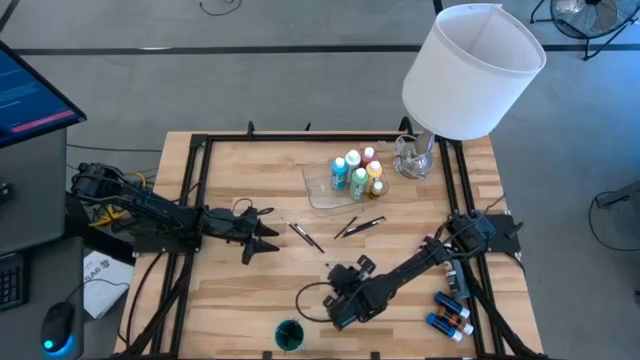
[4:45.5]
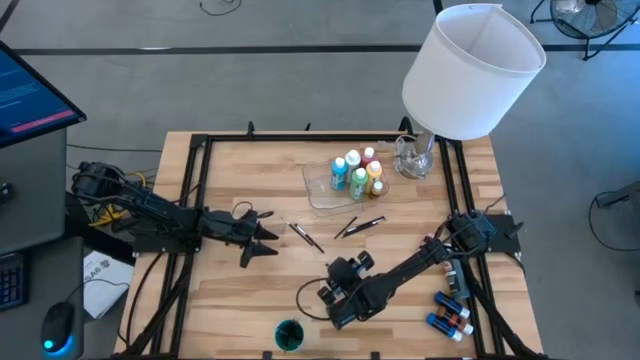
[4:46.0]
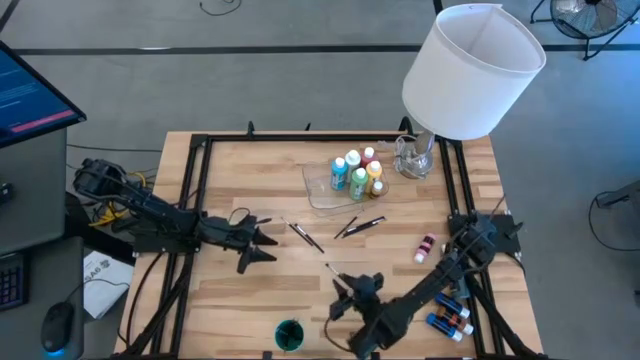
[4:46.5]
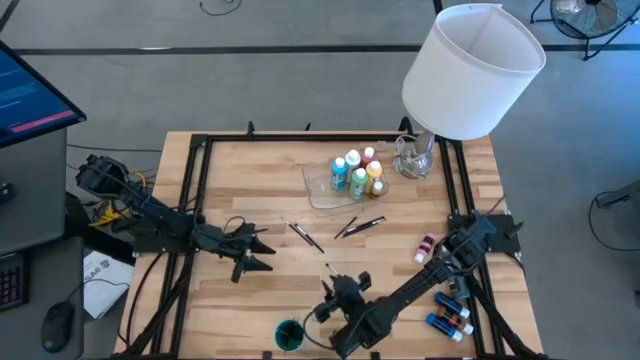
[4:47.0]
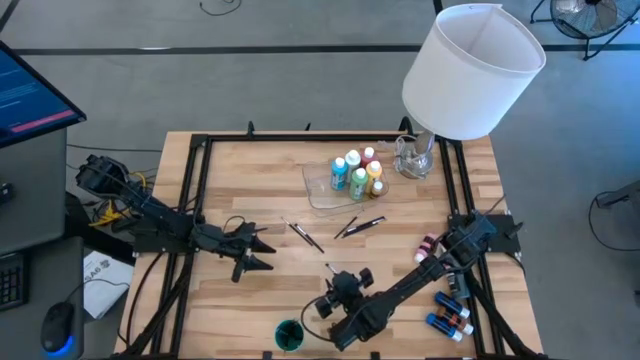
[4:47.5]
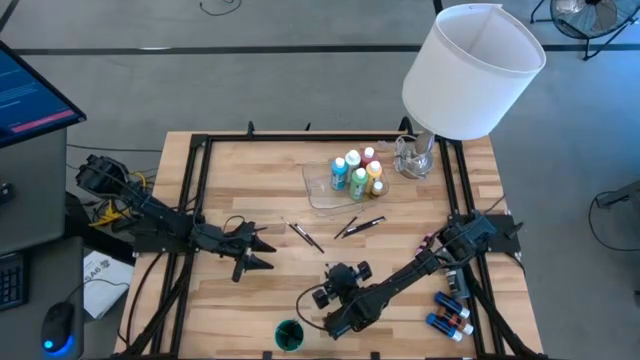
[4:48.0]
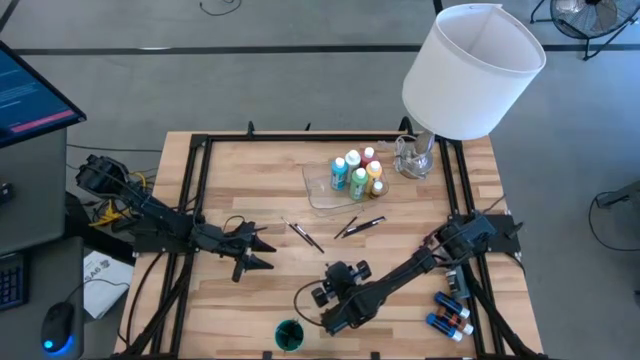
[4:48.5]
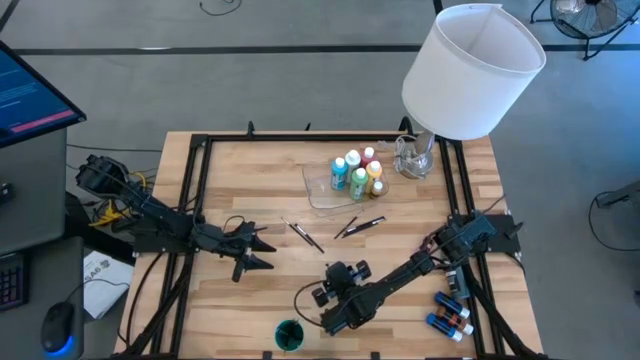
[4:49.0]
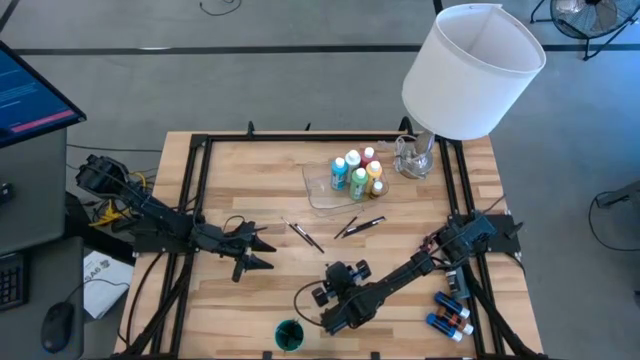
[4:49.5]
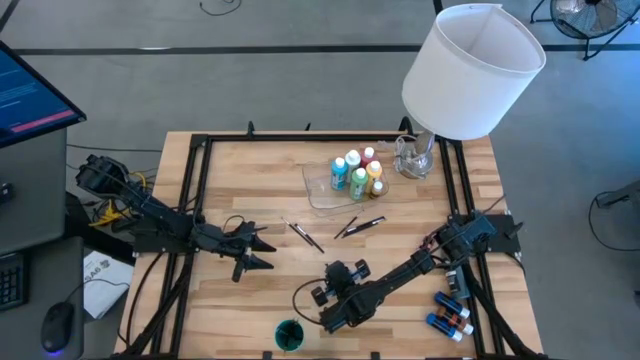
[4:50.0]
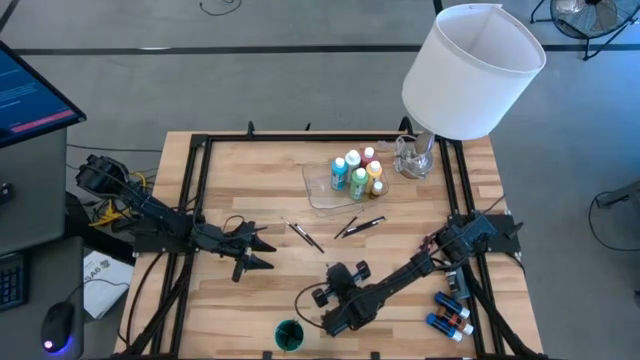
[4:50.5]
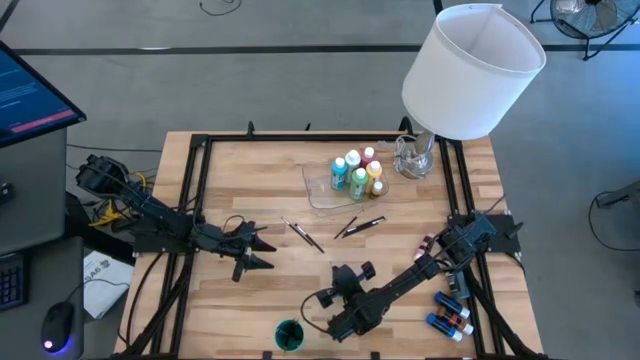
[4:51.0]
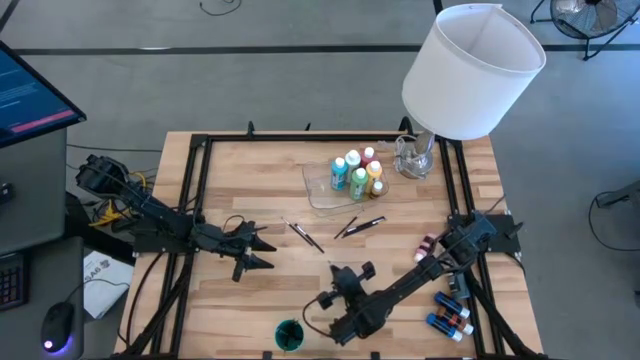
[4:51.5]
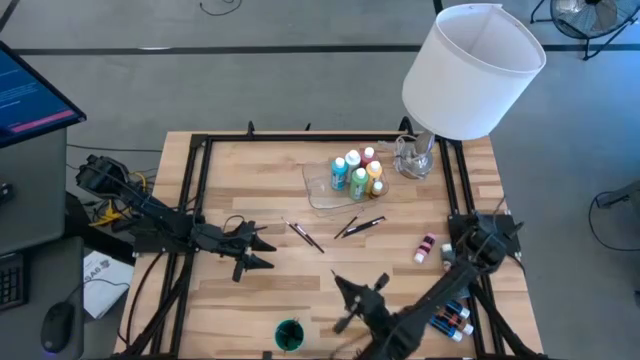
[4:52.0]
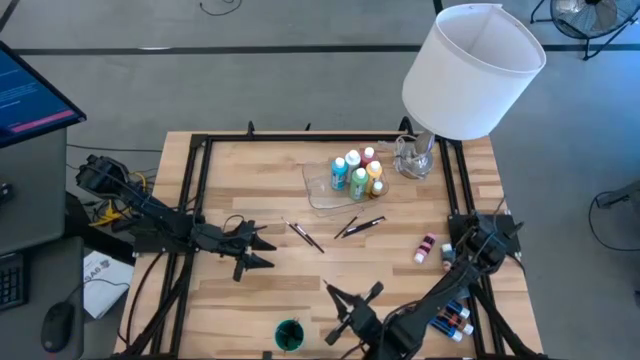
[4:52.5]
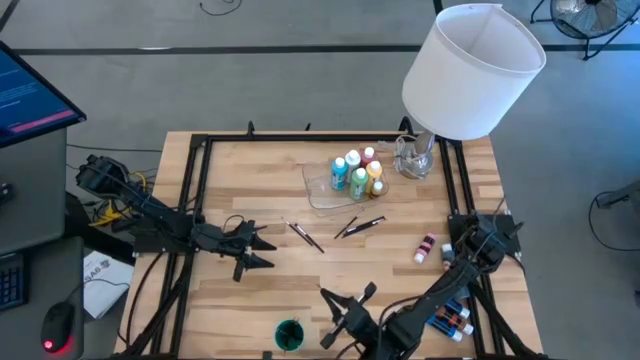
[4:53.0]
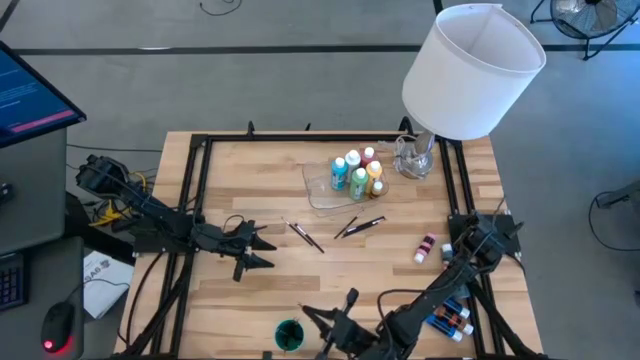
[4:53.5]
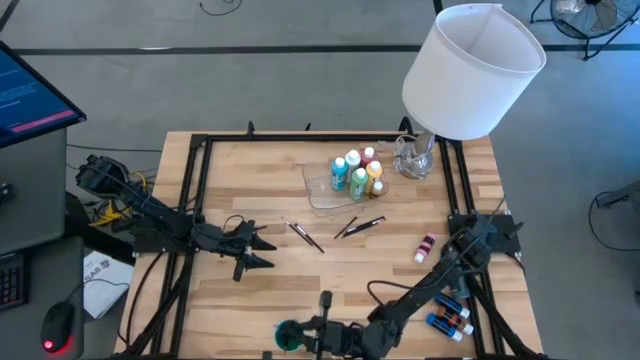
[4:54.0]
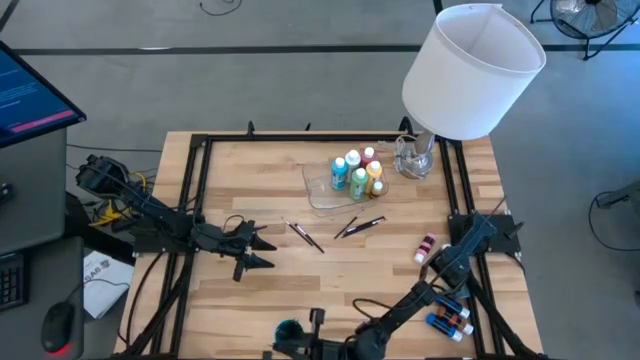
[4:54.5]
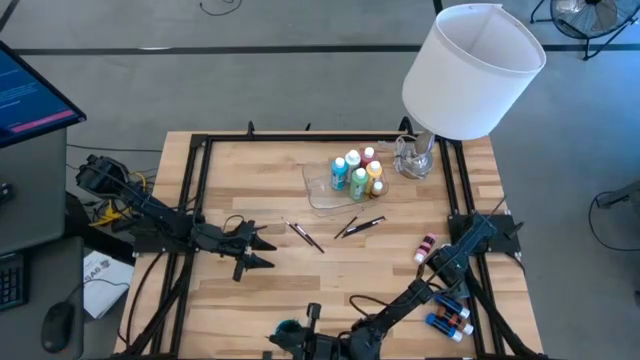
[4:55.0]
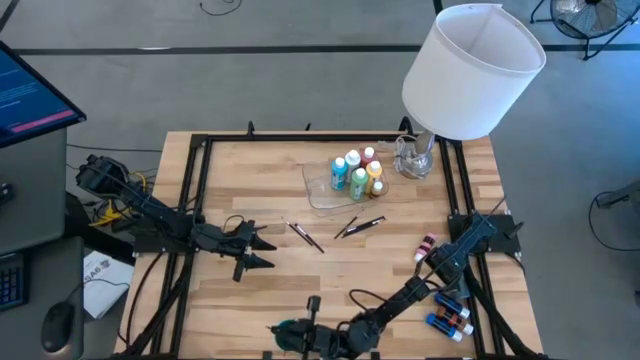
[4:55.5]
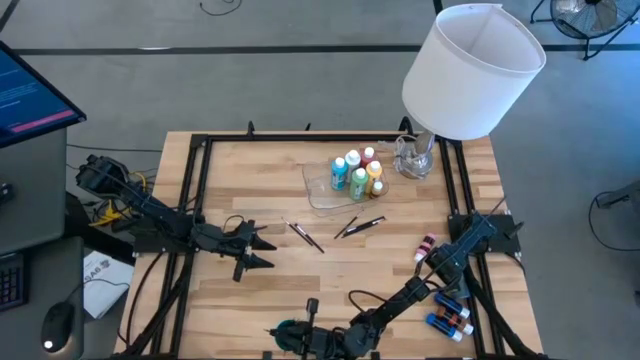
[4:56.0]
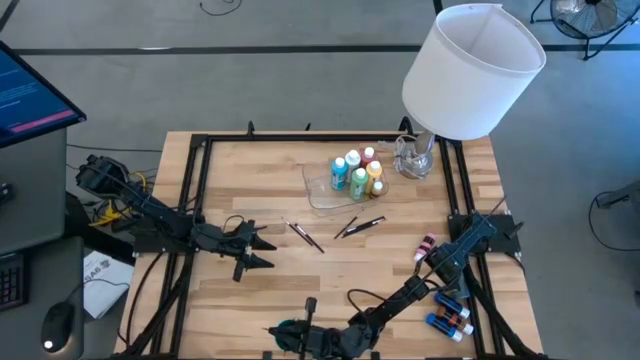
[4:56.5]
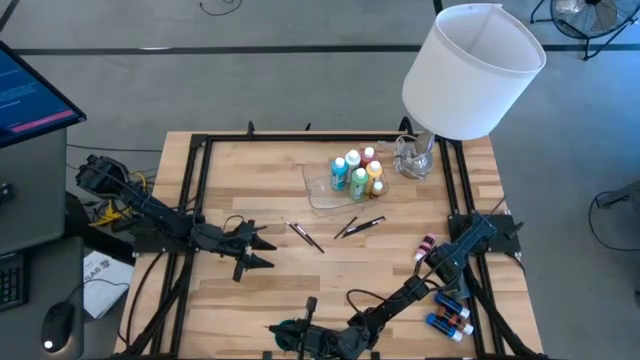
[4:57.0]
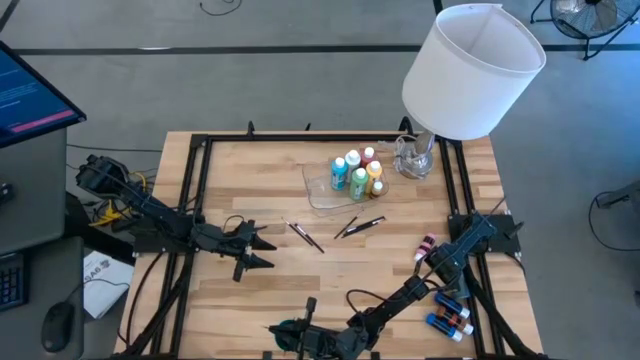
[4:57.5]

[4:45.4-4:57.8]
Task: Pick & Place Paint Supplies
Put the silver paintbrush into the green cup
